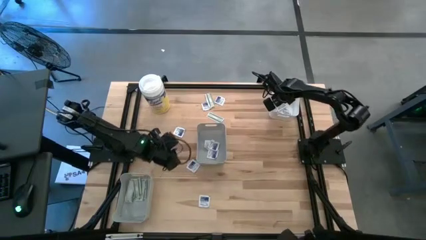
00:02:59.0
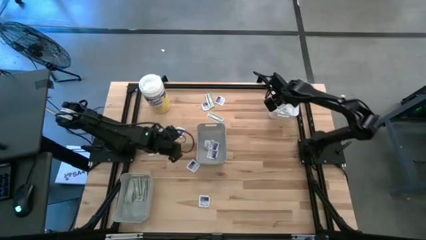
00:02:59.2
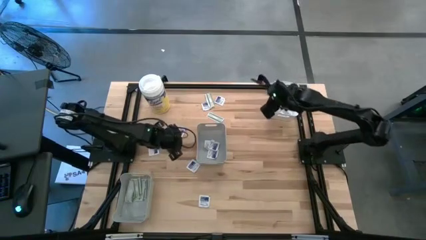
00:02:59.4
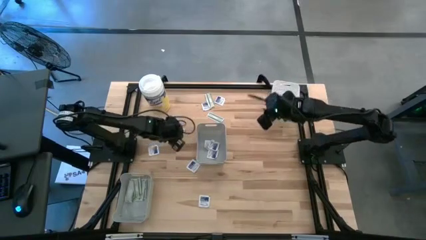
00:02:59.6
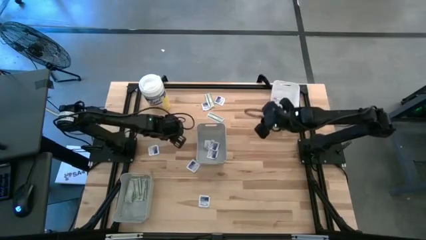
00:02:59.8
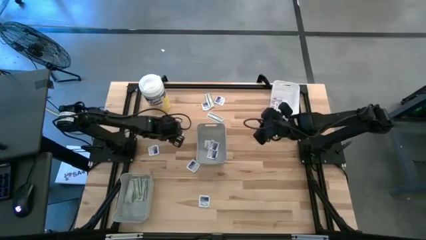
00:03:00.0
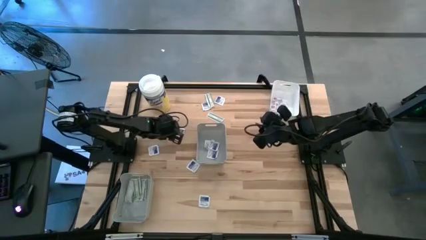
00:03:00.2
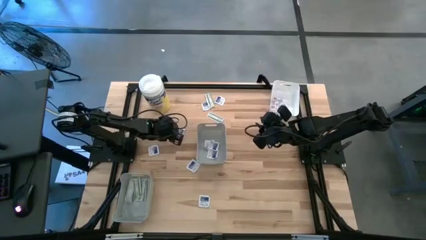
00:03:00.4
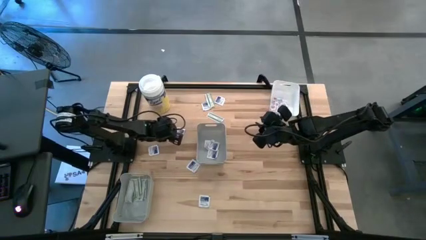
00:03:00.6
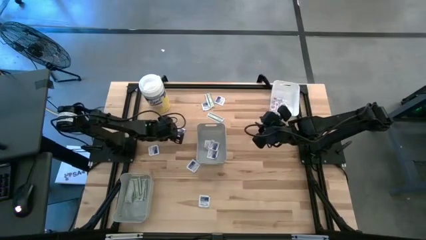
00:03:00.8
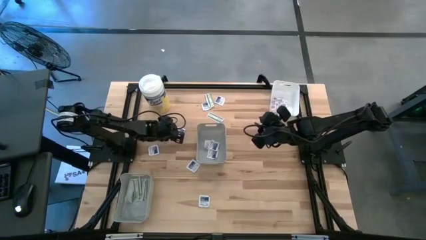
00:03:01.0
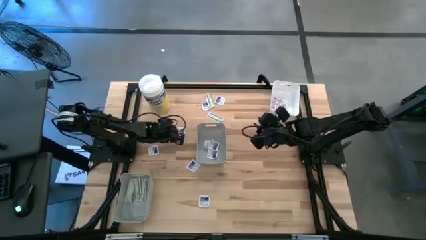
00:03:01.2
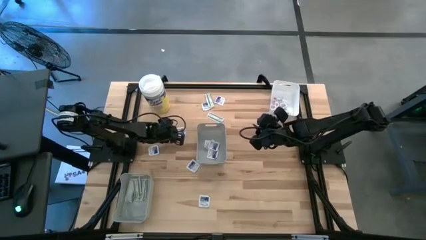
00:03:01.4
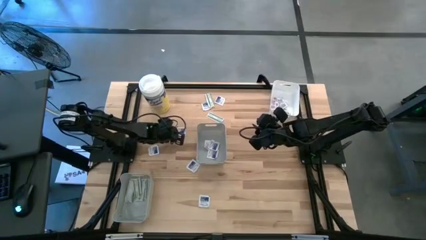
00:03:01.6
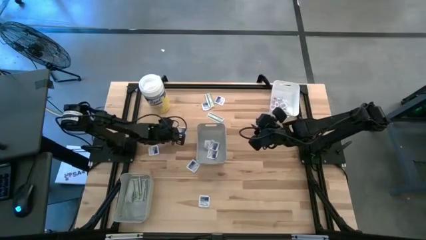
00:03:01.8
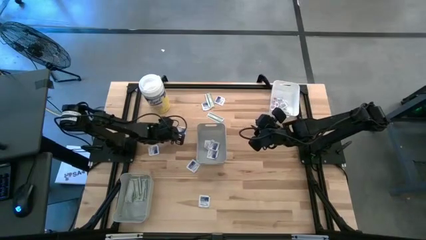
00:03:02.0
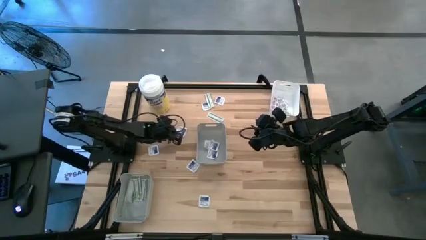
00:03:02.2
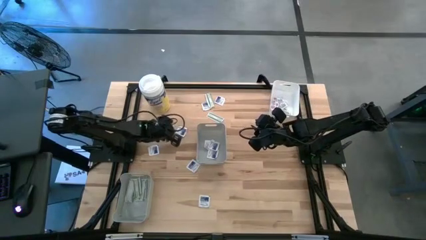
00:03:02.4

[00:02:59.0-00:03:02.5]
Task: Pick & Place First Aid Supplies
Put the blue pad into the middle gray bin

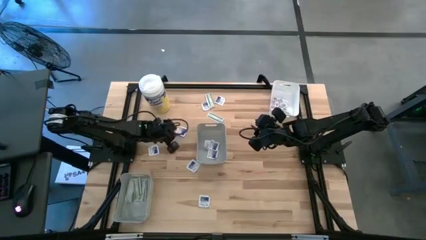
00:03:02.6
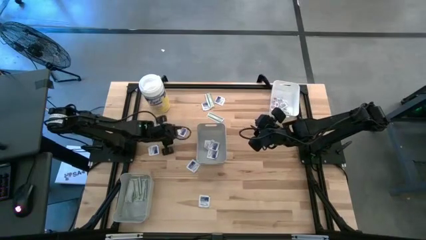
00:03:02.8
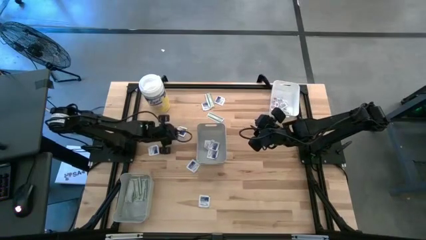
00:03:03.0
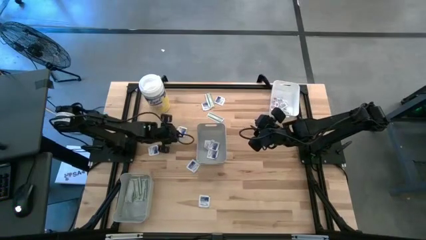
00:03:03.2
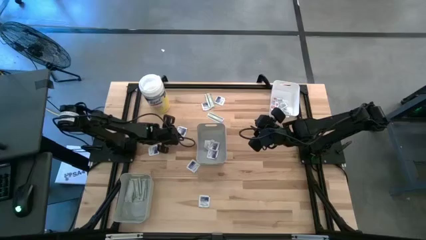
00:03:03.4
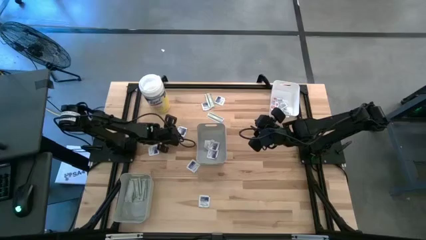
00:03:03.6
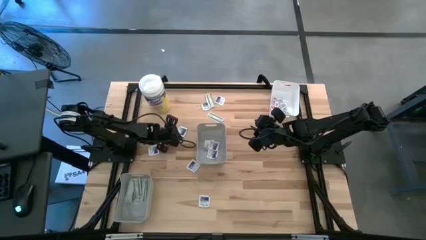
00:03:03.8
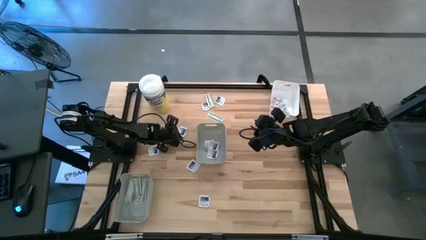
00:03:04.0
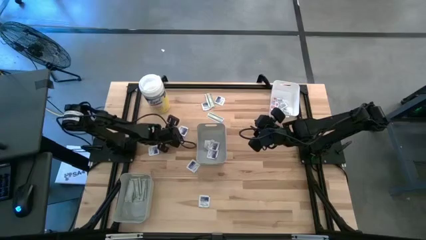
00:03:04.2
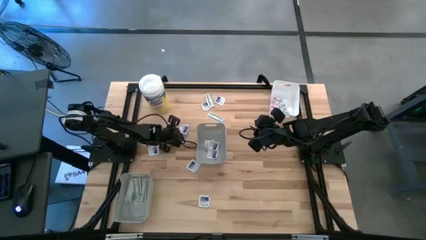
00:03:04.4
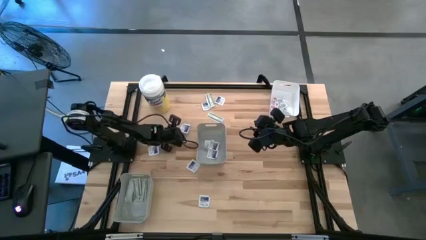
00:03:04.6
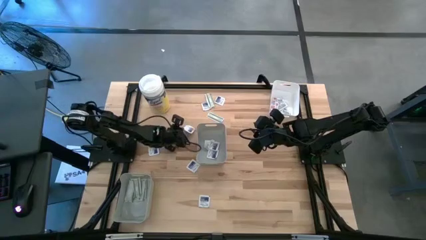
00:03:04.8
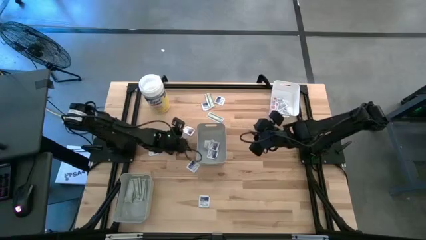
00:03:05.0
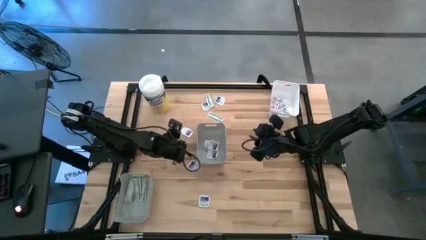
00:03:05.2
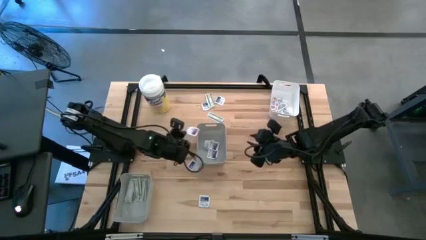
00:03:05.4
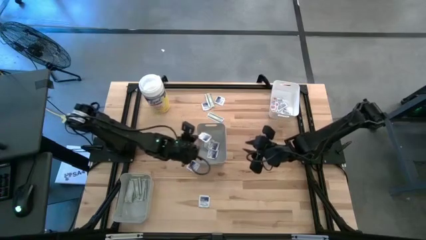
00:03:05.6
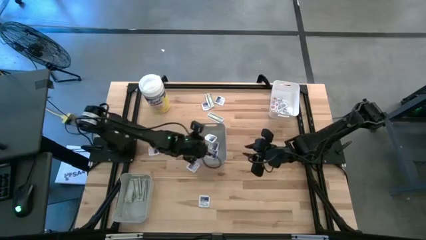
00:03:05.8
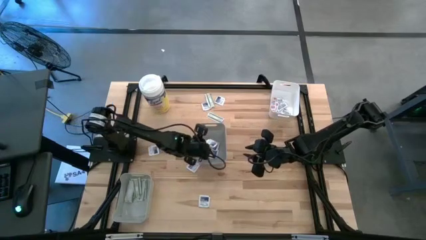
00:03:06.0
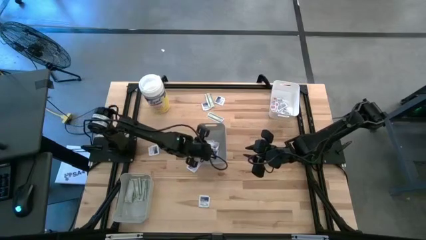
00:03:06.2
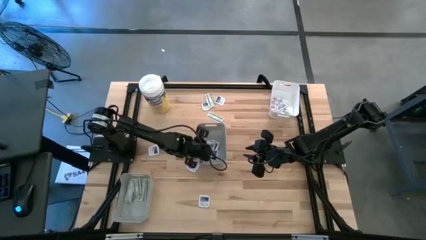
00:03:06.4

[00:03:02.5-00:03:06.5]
Put the blue pad into the middle gray bin

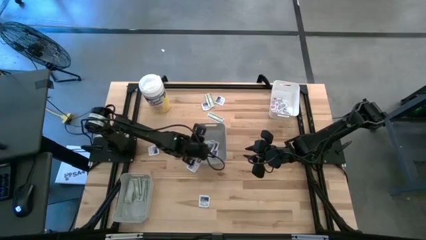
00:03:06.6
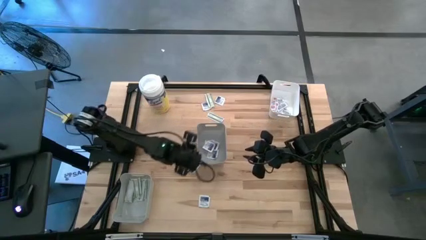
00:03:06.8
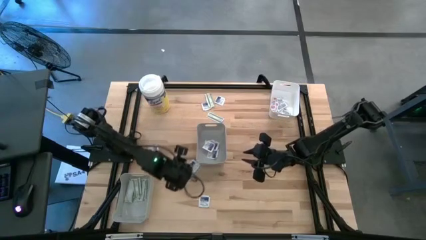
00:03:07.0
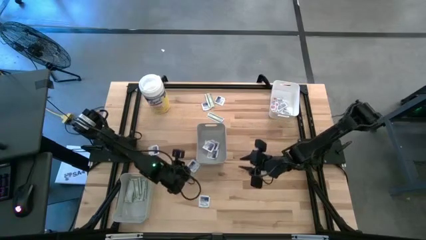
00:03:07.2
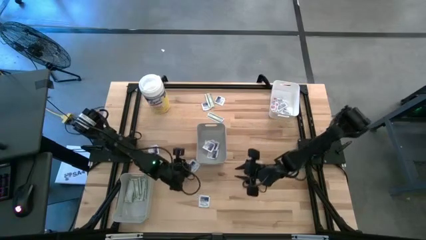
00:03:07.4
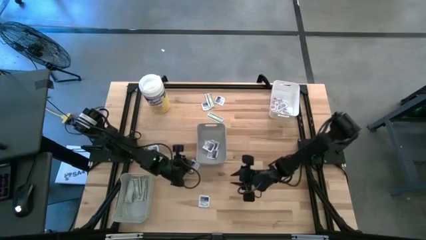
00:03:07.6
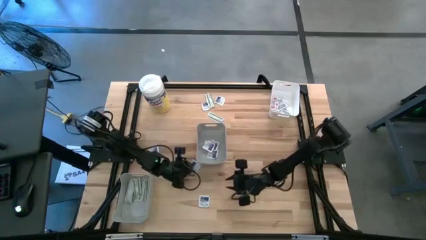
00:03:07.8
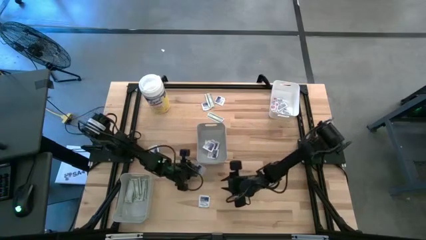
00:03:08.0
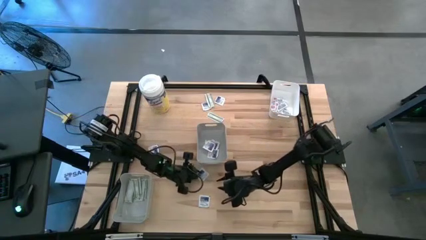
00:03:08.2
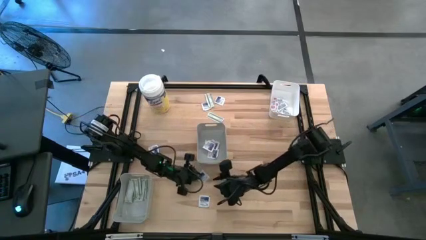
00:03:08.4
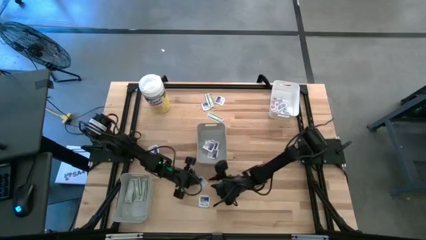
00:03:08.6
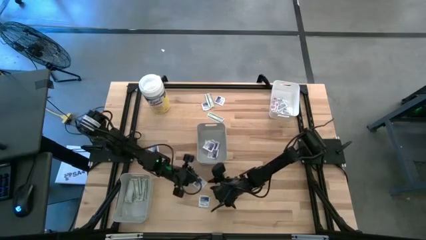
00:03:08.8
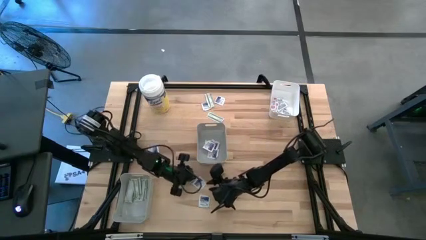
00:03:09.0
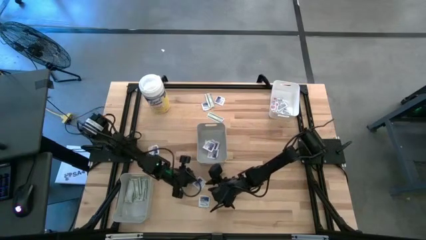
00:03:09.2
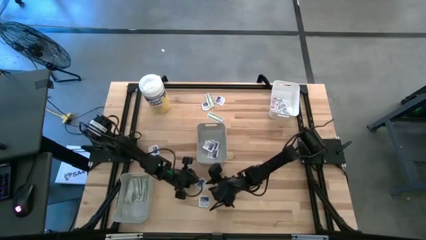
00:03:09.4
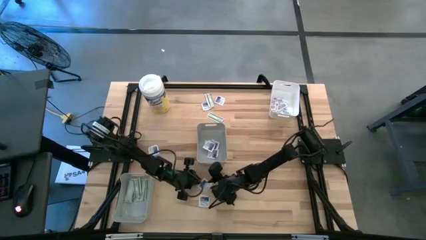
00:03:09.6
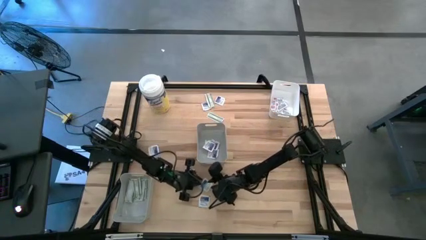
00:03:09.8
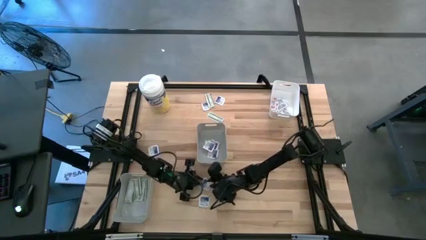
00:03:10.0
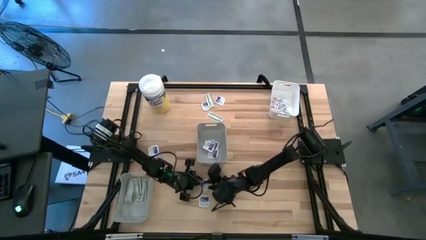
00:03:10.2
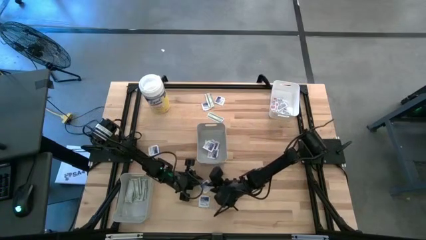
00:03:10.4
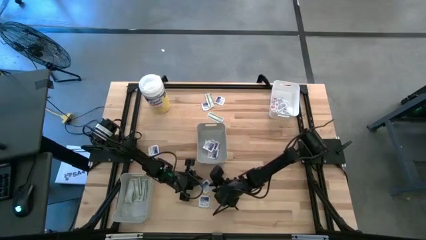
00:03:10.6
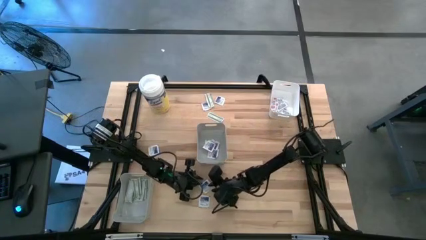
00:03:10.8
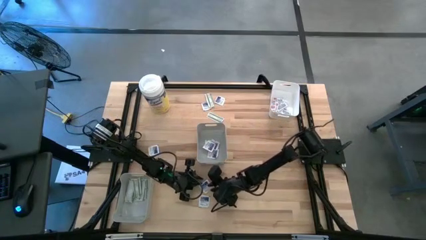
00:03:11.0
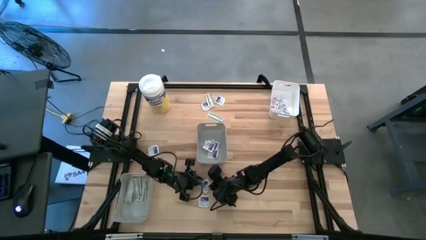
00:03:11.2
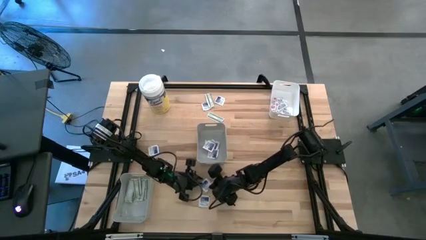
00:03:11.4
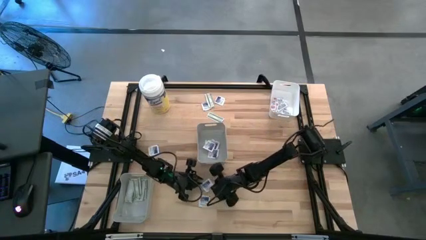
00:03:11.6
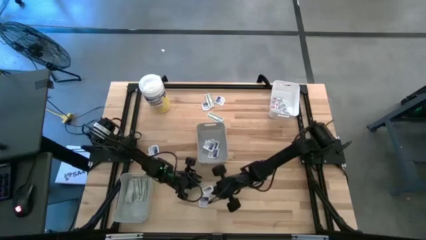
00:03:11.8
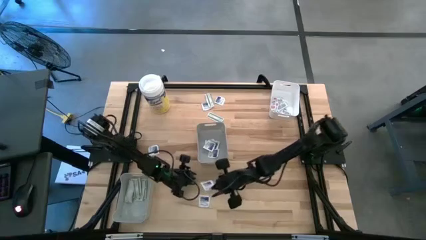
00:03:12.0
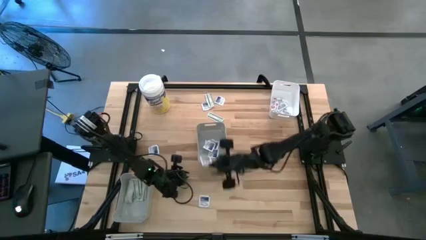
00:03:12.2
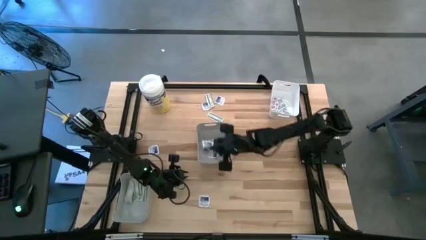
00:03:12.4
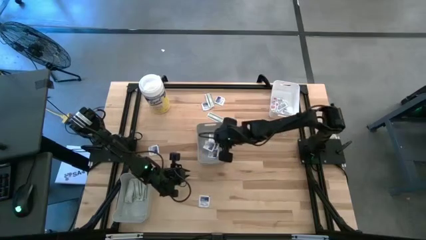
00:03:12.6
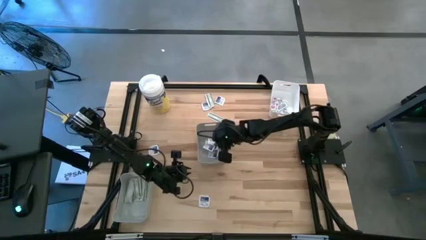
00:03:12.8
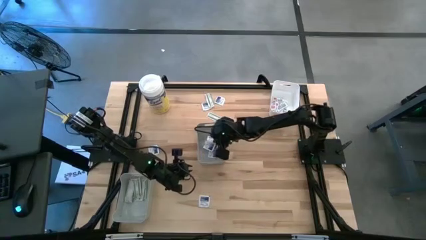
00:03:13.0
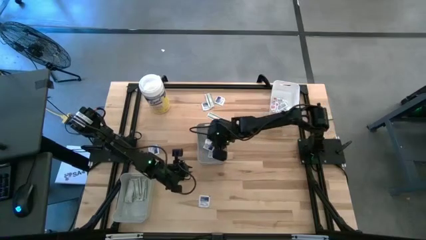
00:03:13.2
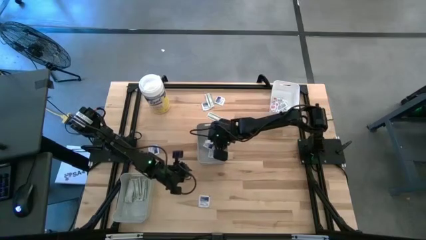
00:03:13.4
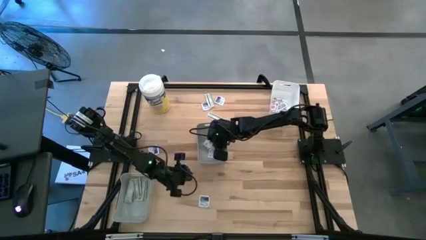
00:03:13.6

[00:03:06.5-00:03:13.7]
Put the blue pad into the middle gray bin
